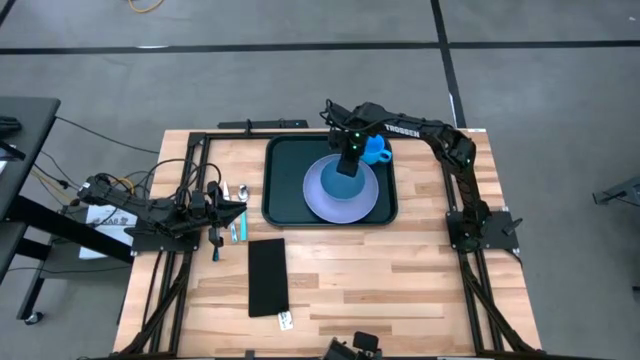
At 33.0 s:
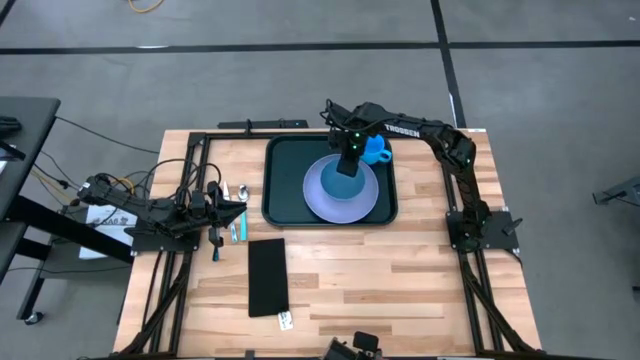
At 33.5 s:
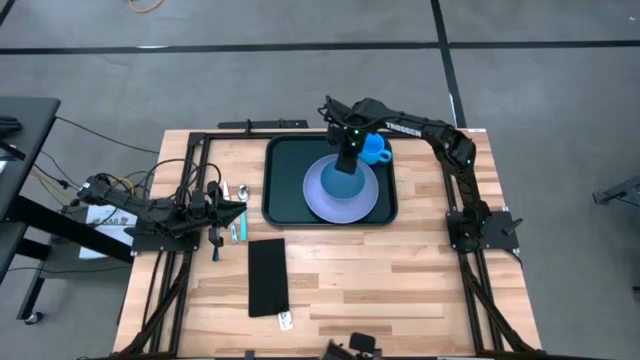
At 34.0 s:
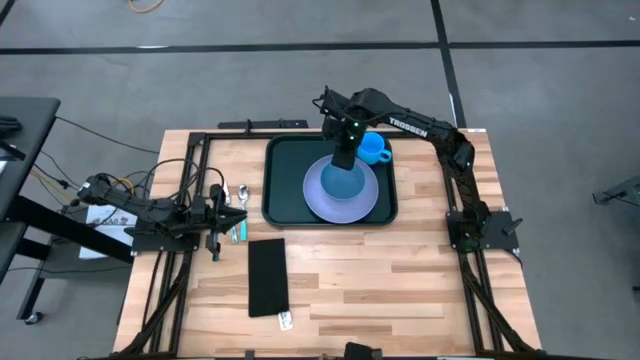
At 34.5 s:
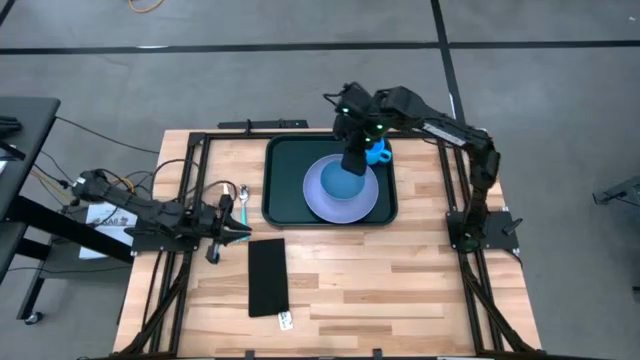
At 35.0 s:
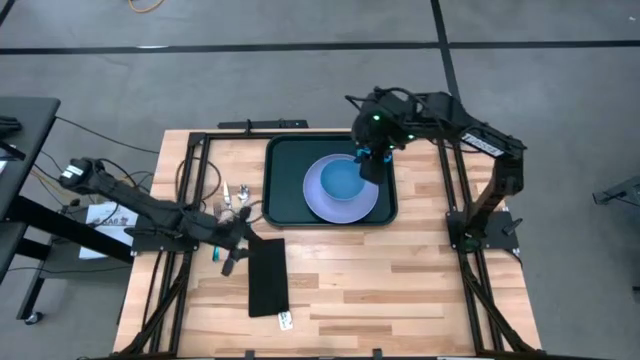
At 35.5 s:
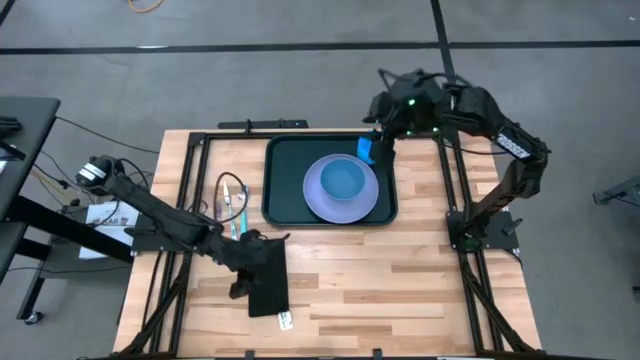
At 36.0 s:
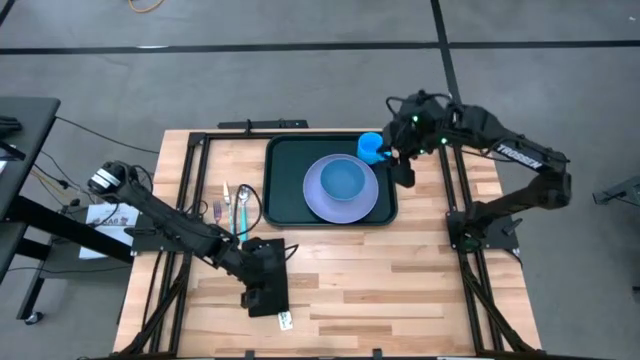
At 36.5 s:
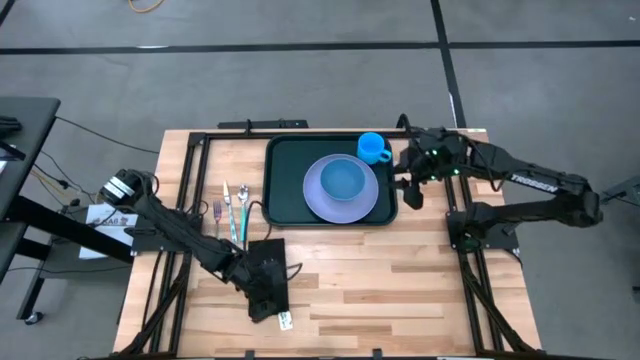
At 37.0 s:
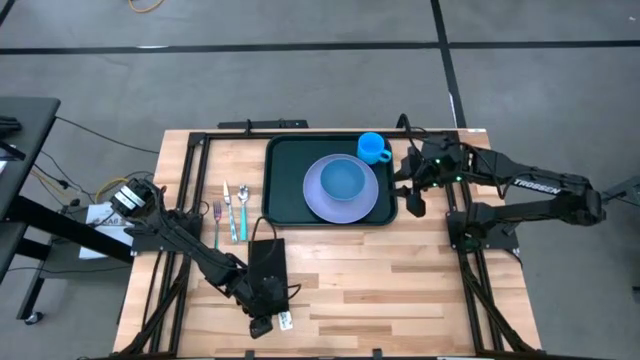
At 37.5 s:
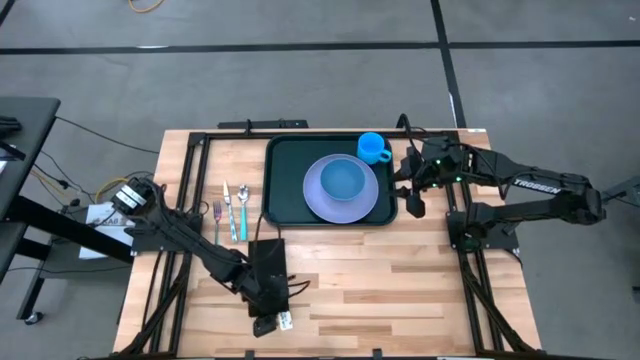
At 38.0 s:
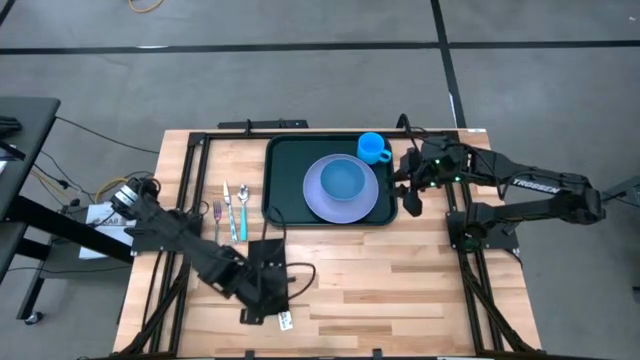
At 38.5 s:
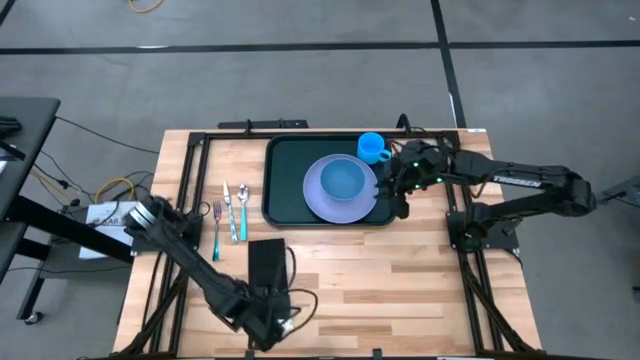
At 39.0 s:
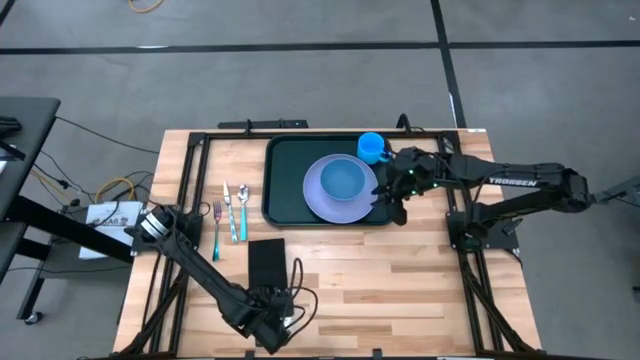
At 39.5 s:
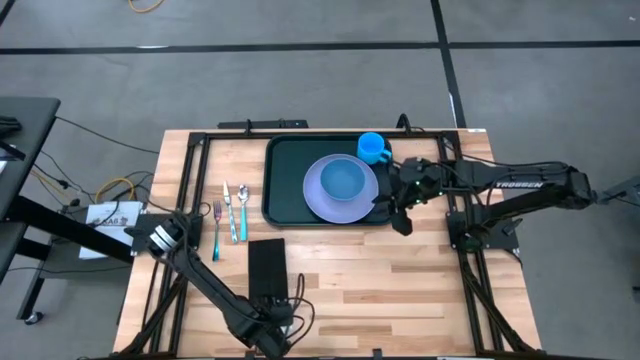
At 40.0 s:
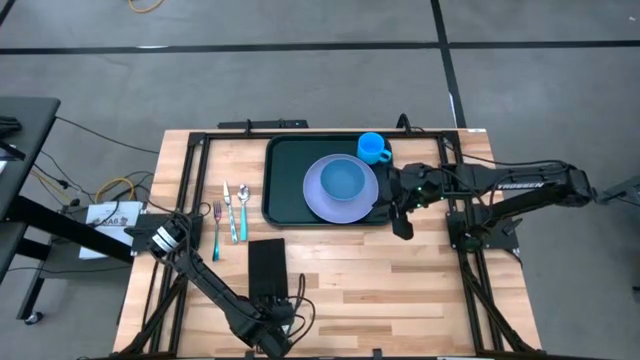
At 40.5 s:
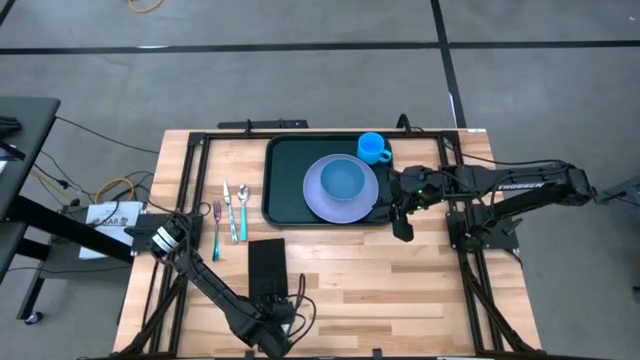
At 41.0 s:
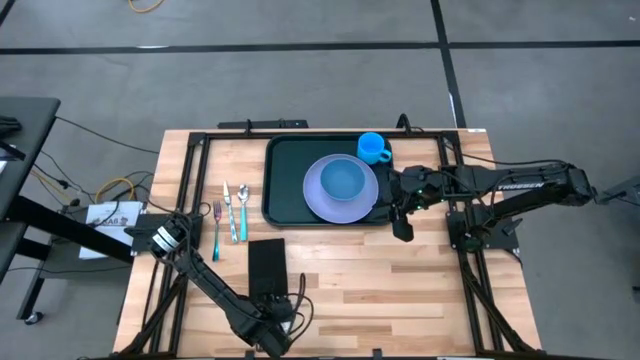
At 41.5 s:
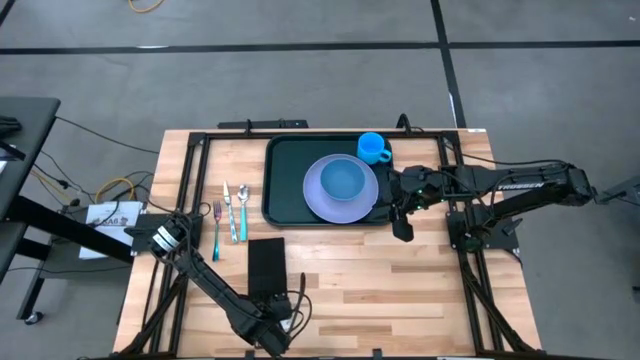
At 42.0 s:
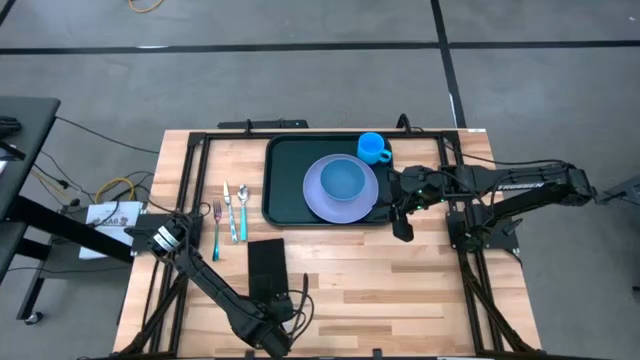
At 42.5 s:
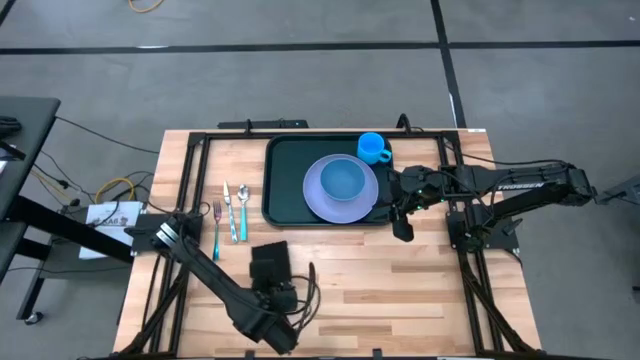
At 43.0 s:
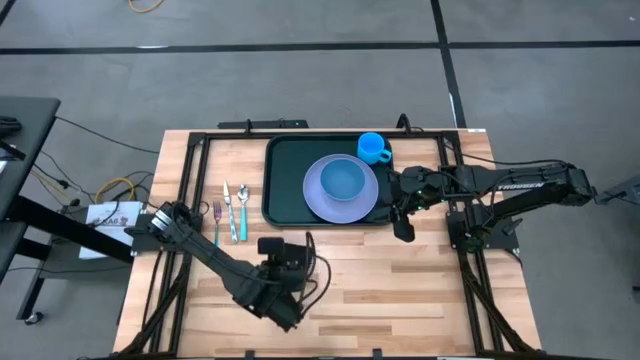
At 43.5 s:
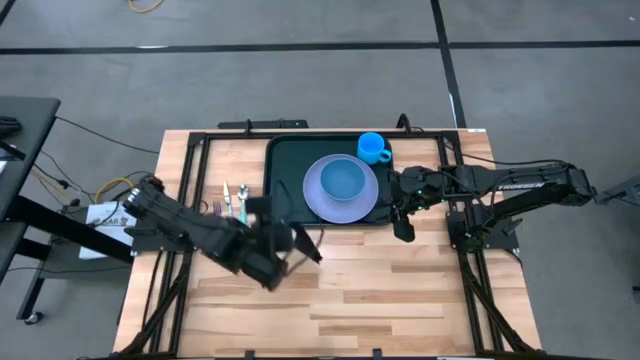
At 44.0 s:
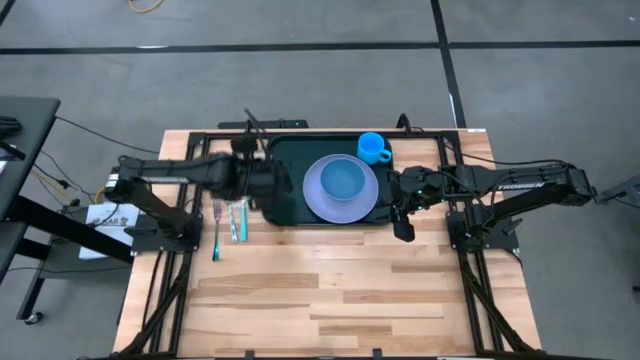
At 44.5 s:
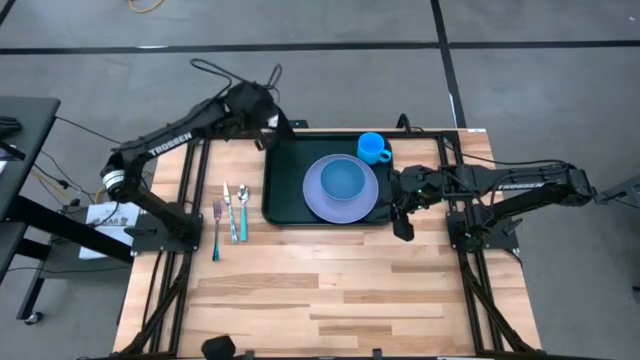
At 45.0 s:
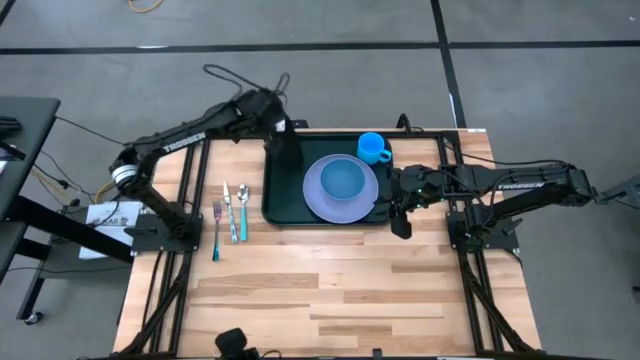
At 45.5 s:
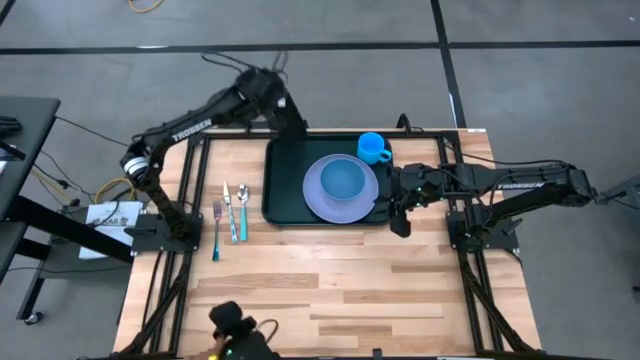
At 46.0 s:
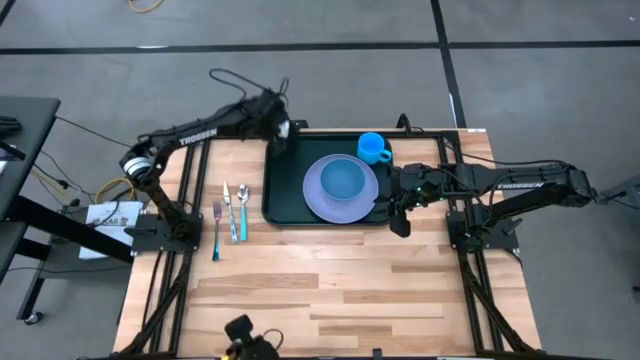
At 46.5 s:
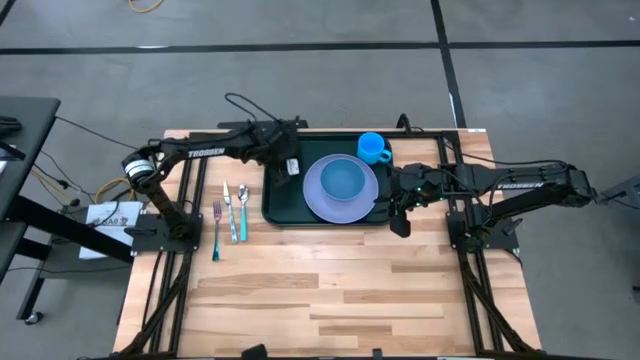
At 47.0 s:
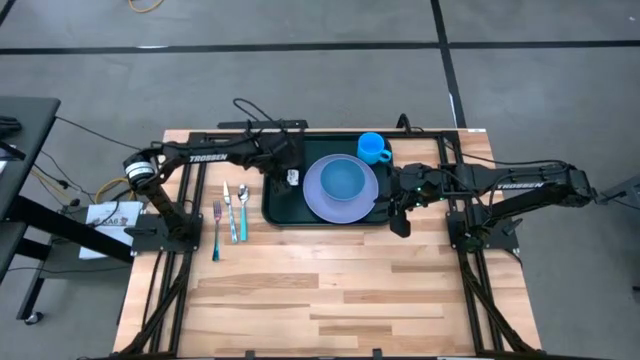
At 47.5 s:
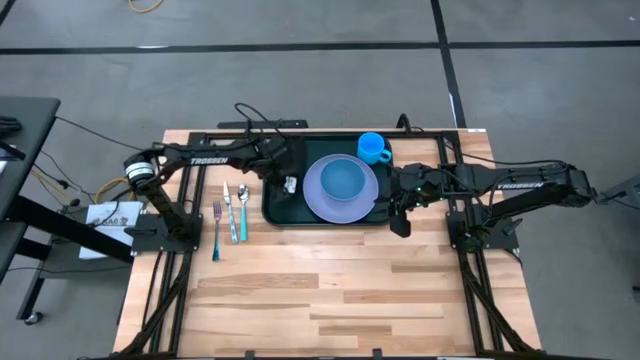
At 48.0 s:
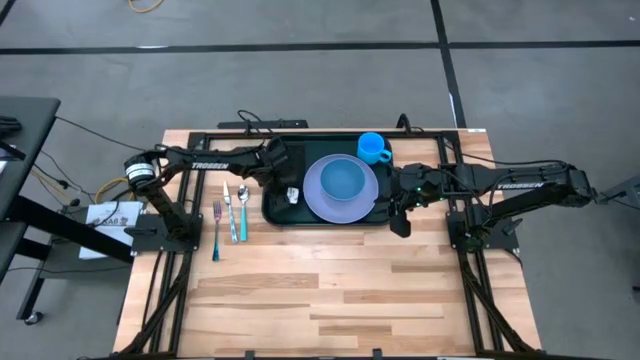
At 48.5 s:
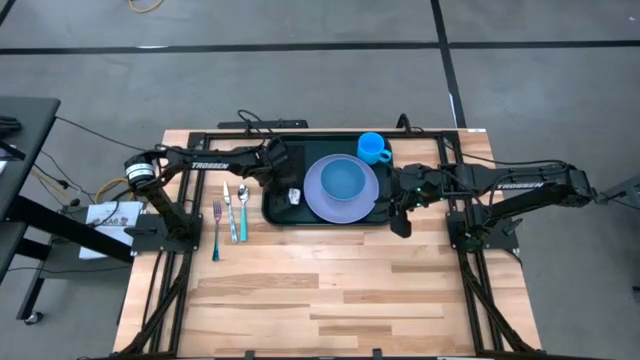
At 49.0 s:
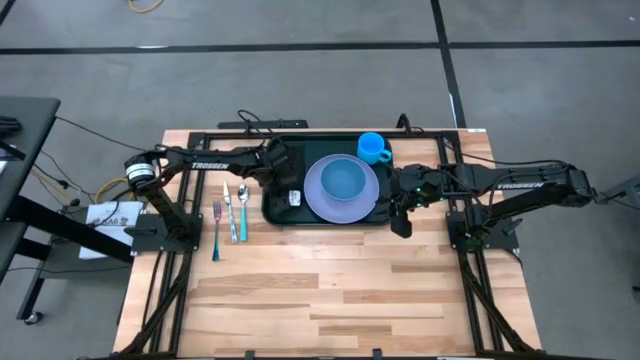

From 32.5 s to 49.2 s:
Task: Set up tray
Put the black napkin on top of the black tray to the left of the purple plate

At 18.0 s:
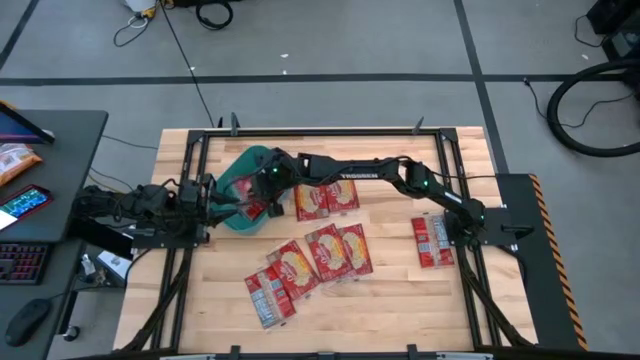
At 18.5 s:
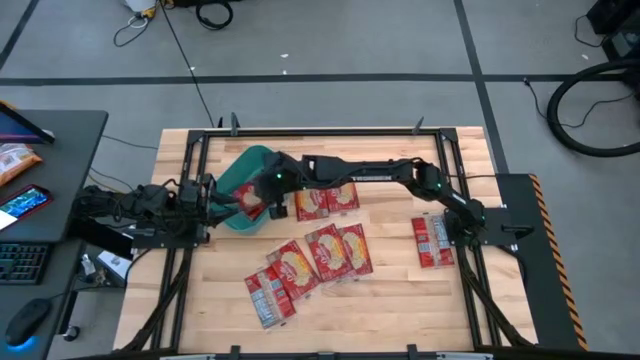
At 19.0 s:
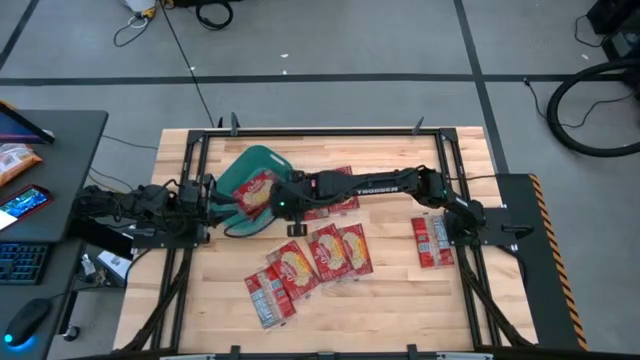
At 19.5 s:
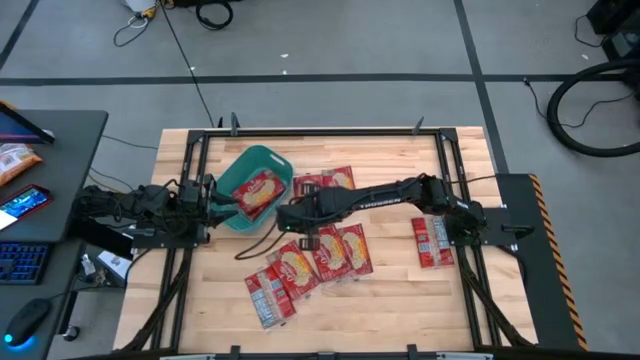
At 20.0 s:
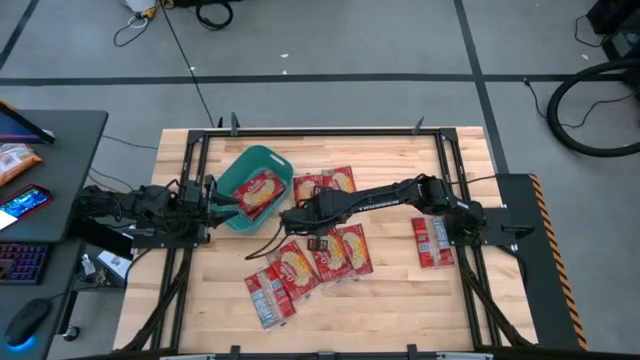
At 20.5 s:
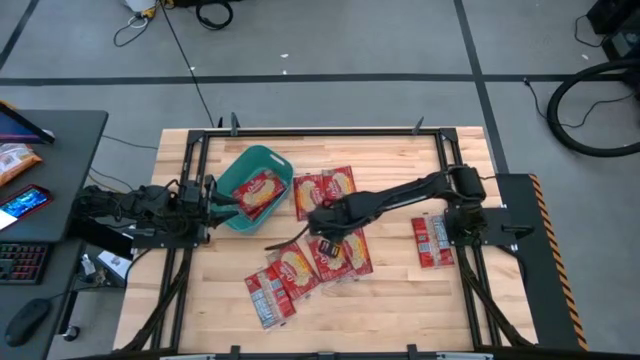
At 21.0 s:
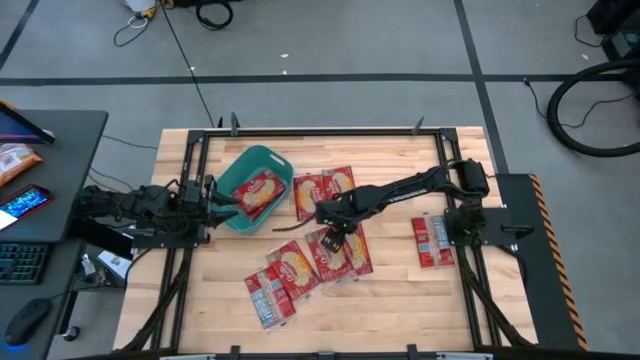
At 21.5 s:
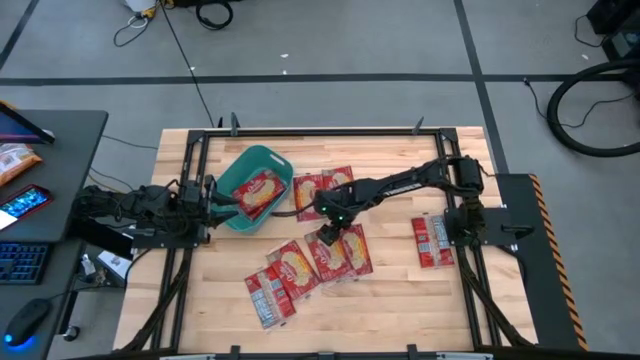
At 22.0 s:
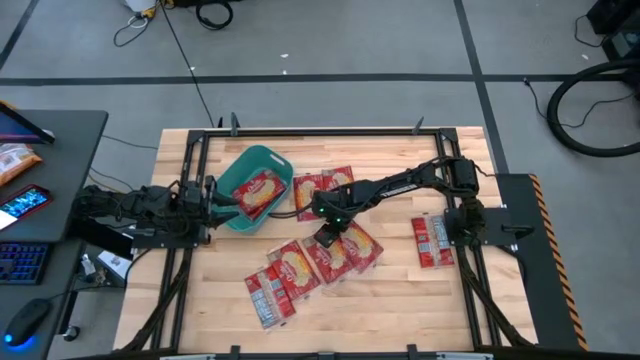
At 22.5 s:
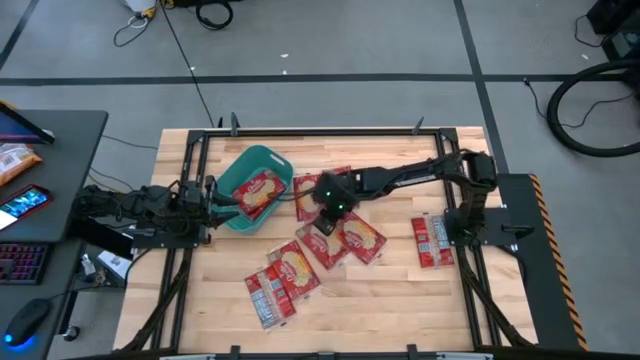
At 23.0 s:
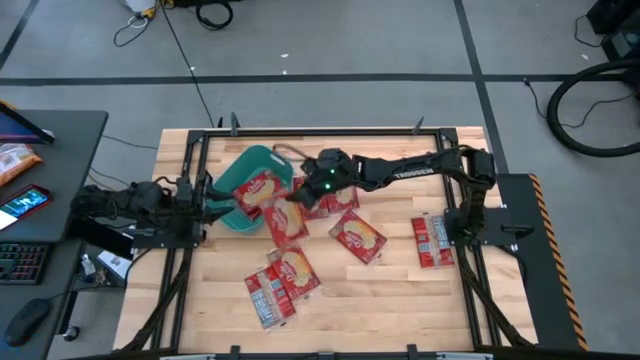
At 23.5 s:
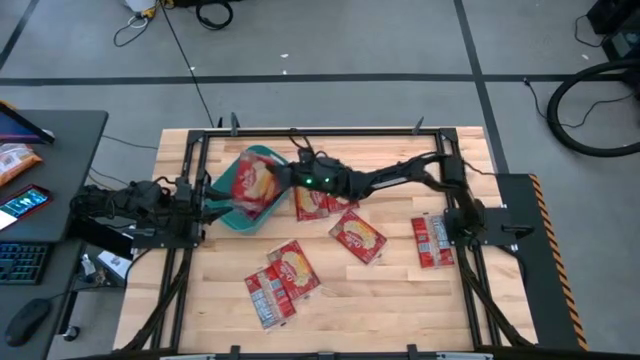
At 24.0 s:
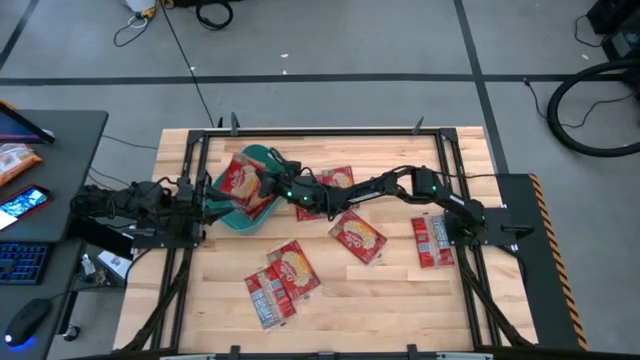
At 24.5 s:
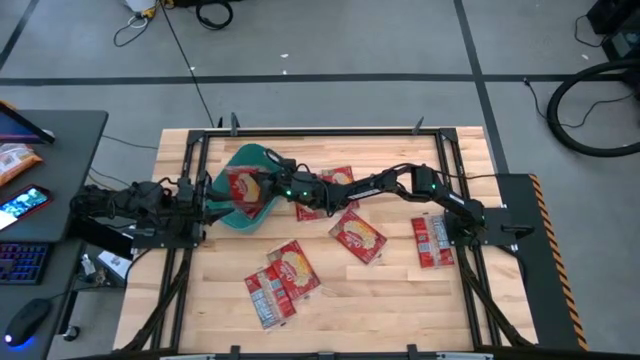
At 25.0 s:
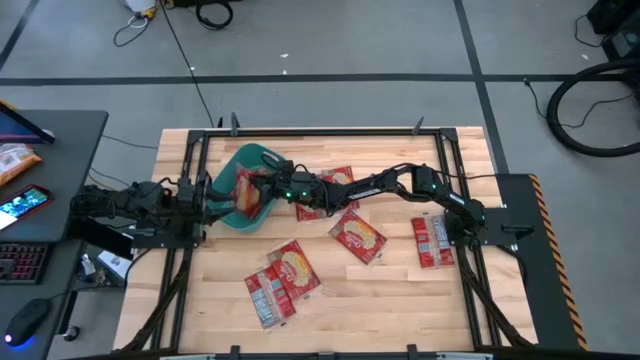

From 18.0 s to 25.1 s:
Task: Sort popcorn bags into baskets
Put the red popcorn bag into the green bin
